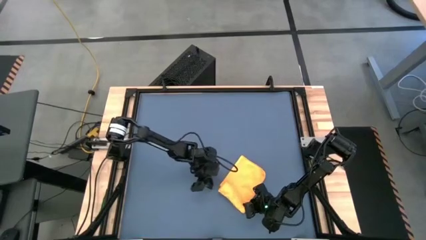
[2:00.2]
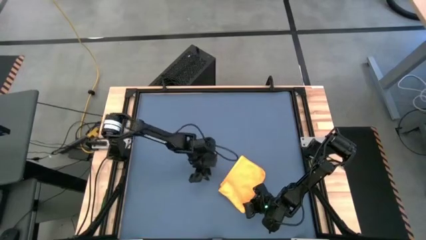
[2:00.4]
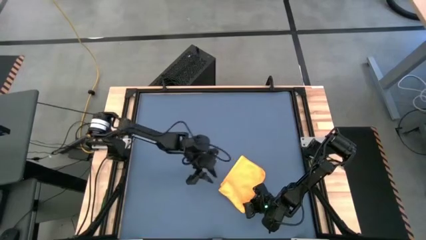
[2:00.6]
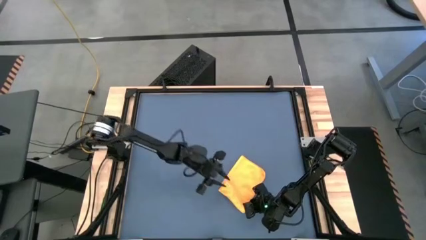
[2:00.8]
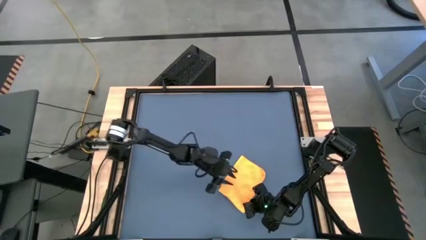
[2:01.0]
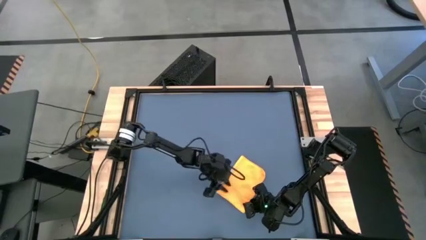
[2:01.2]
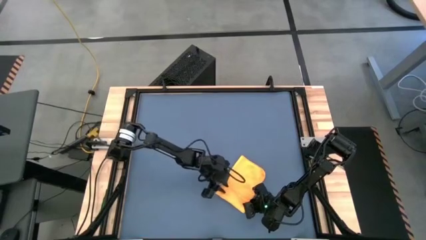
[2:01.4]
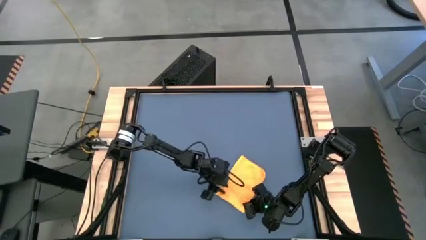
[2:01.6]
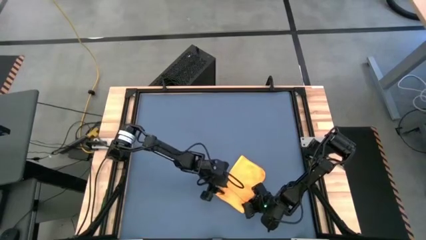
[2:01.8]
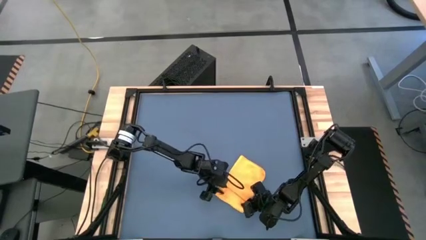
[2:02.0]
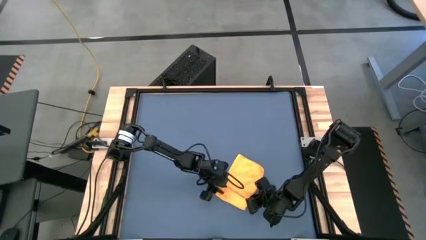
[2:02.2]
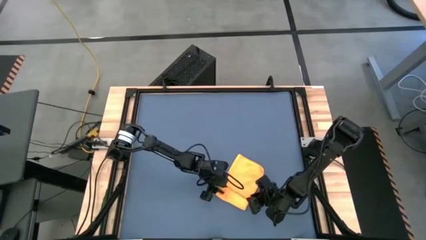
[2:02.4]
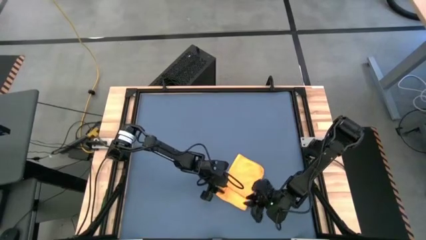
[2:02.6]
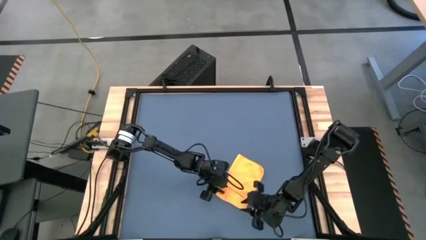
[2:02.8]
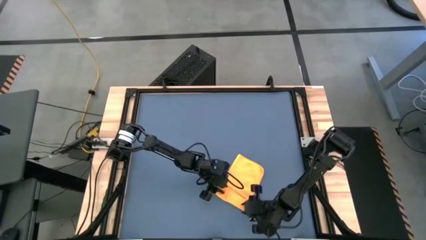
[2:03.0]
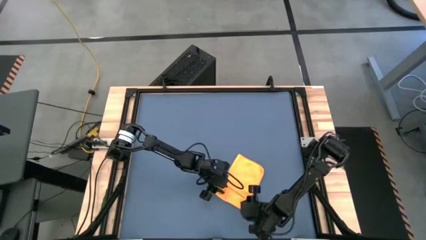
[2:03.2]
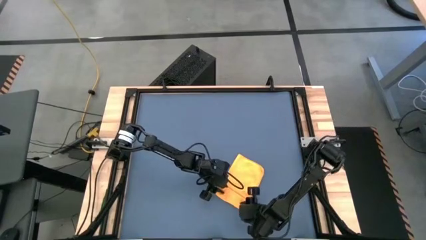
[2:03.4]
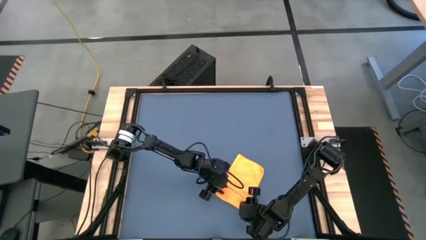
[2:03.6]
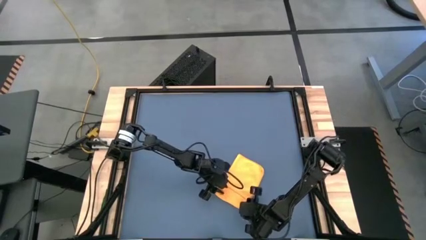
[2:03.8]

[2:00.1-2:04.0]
Task: Roll towel
Roll the orange microfiber towel

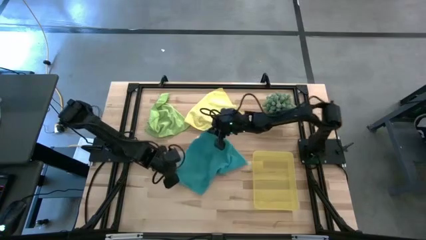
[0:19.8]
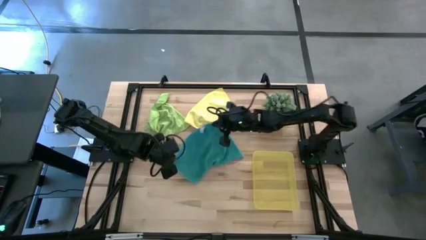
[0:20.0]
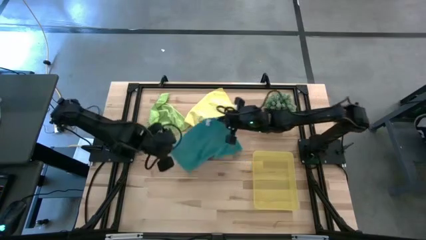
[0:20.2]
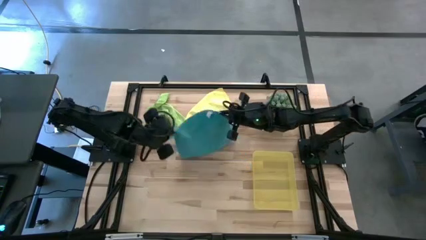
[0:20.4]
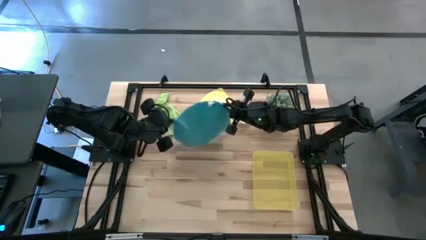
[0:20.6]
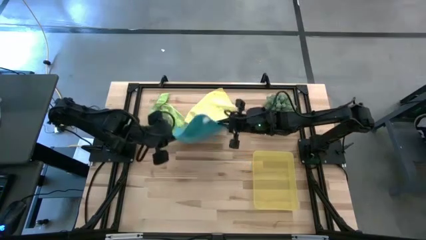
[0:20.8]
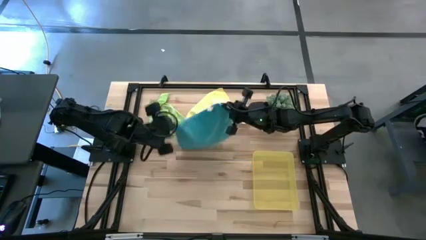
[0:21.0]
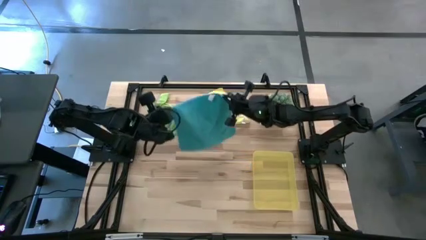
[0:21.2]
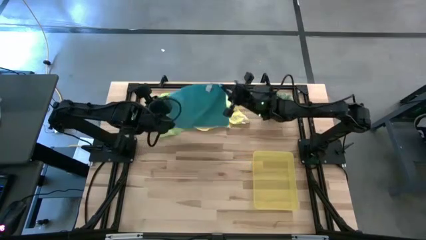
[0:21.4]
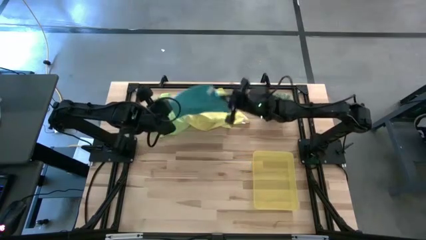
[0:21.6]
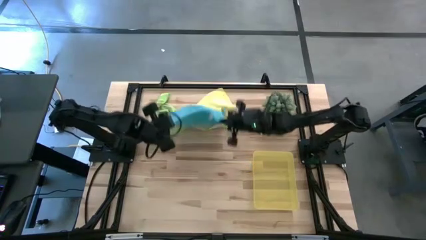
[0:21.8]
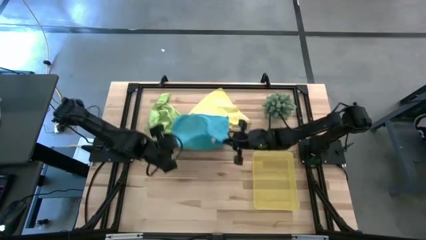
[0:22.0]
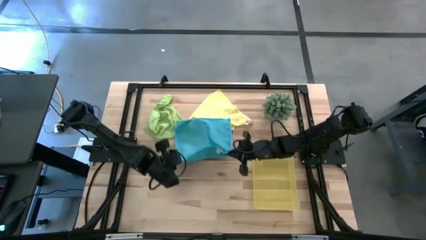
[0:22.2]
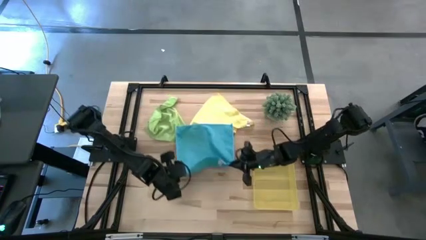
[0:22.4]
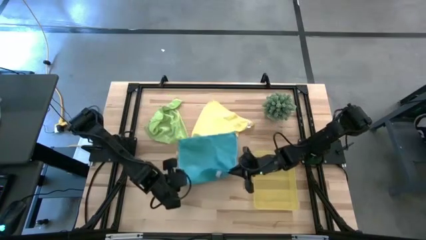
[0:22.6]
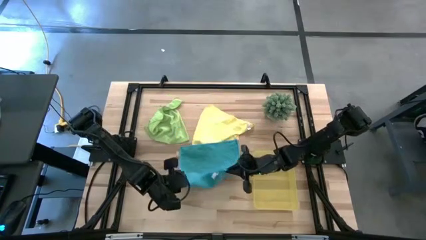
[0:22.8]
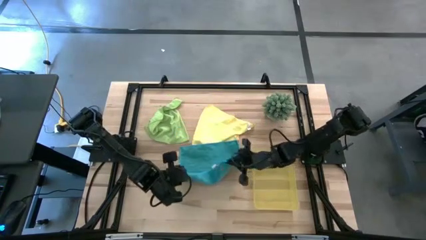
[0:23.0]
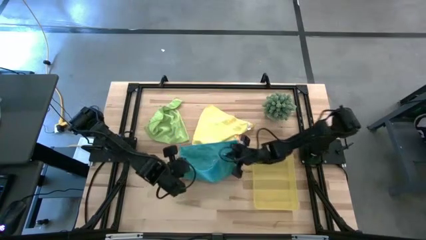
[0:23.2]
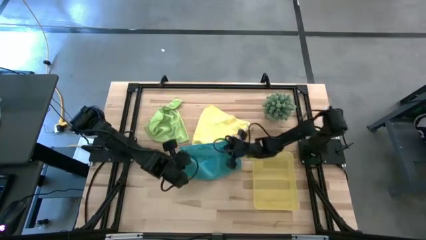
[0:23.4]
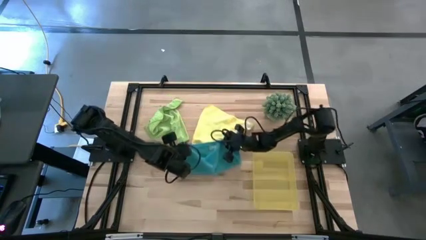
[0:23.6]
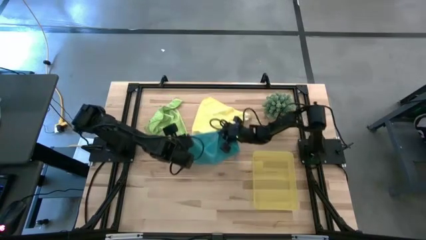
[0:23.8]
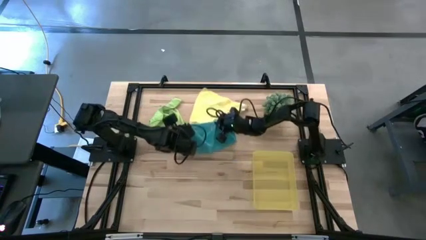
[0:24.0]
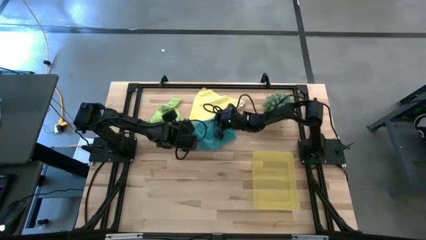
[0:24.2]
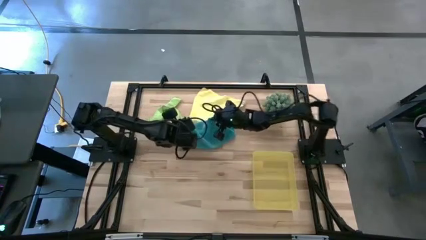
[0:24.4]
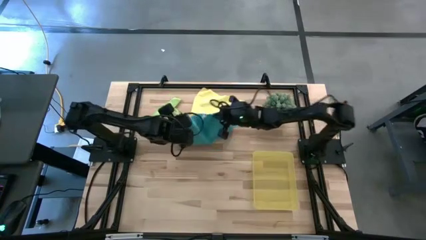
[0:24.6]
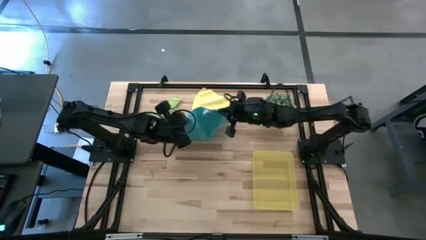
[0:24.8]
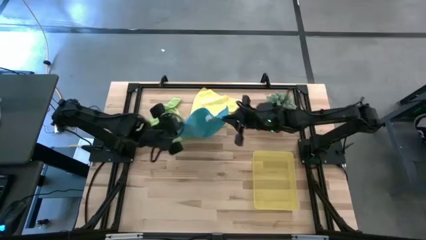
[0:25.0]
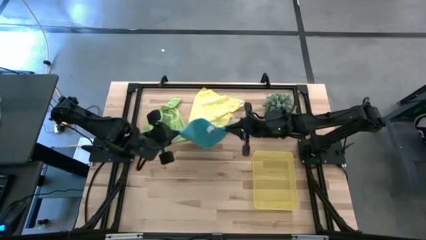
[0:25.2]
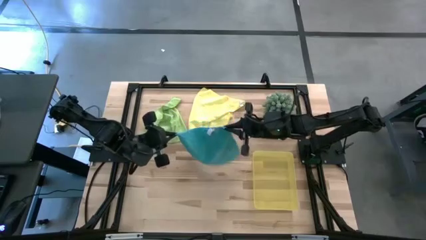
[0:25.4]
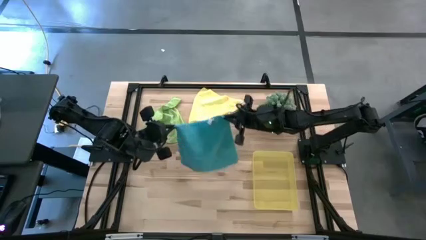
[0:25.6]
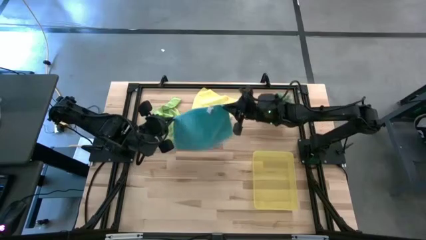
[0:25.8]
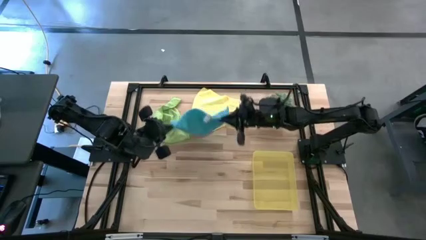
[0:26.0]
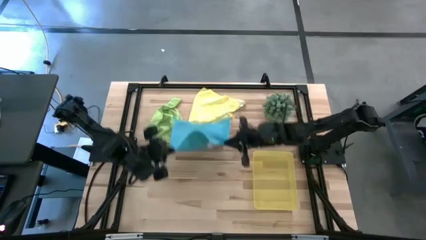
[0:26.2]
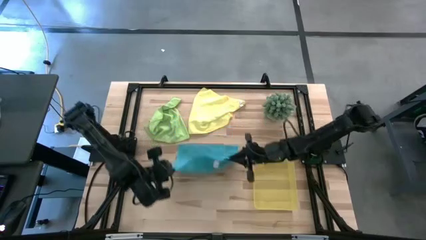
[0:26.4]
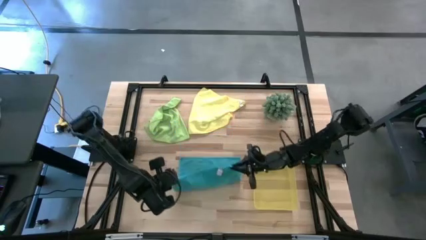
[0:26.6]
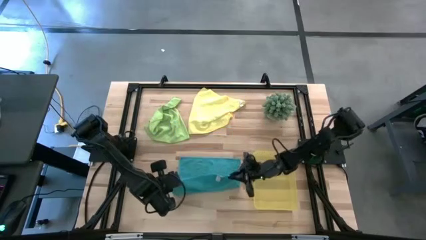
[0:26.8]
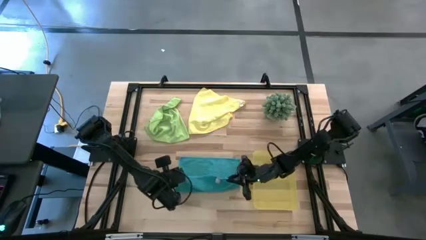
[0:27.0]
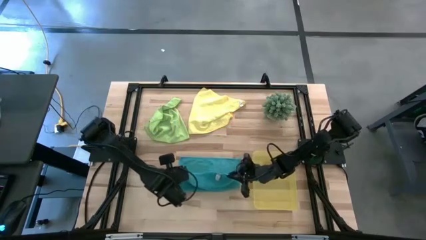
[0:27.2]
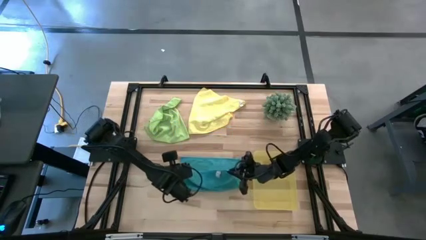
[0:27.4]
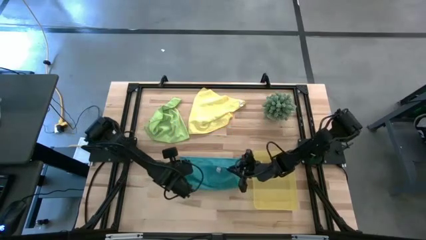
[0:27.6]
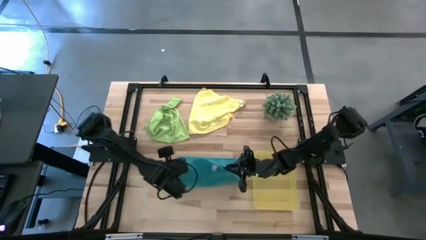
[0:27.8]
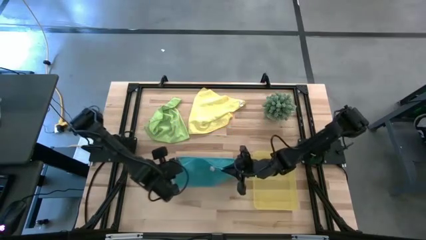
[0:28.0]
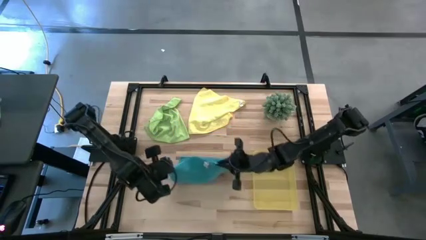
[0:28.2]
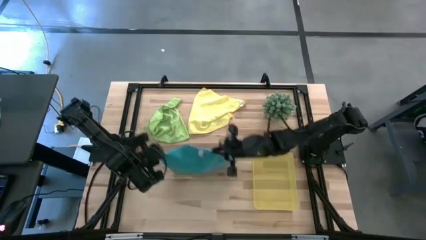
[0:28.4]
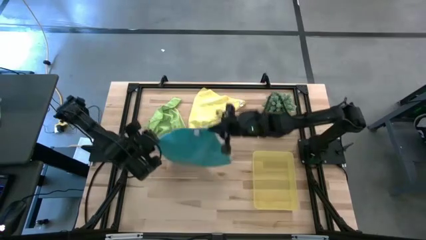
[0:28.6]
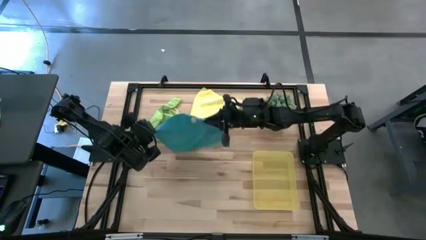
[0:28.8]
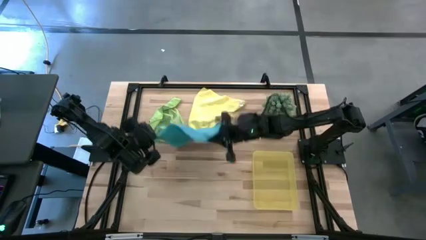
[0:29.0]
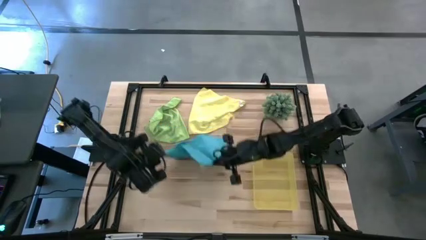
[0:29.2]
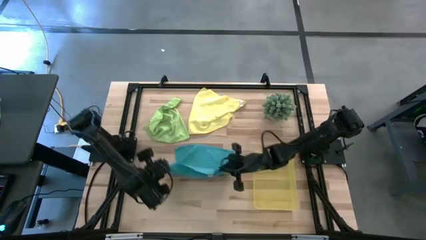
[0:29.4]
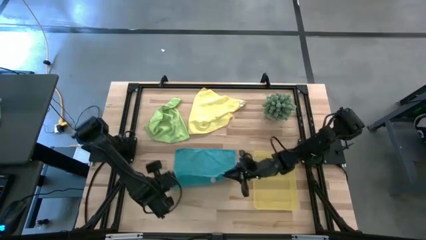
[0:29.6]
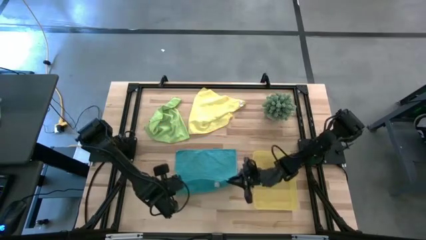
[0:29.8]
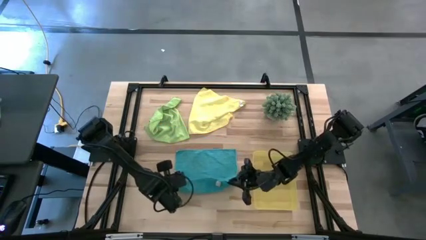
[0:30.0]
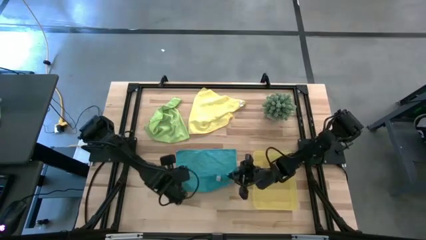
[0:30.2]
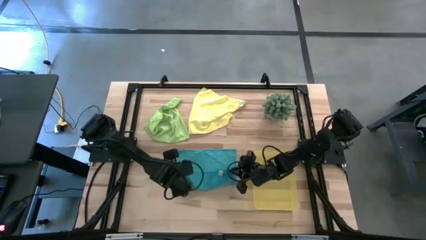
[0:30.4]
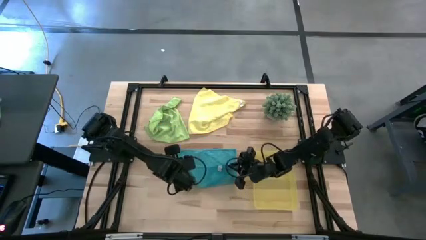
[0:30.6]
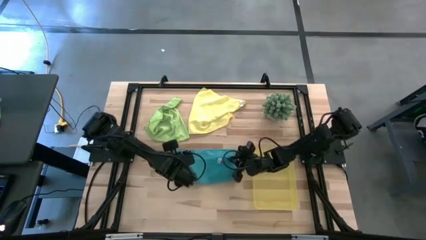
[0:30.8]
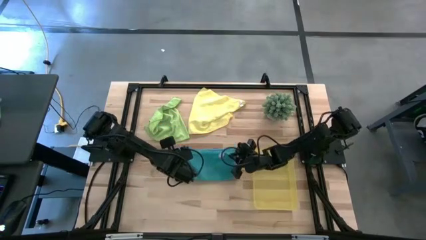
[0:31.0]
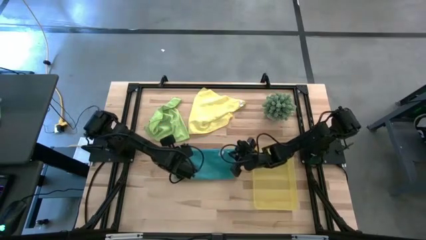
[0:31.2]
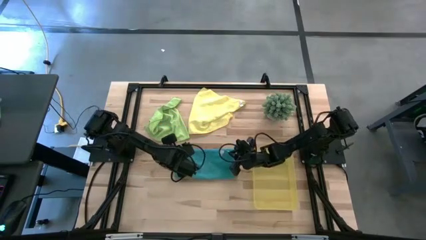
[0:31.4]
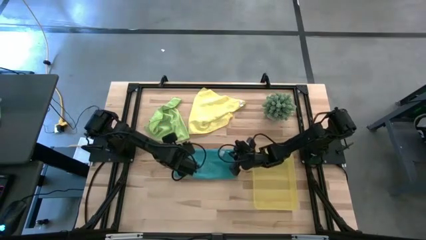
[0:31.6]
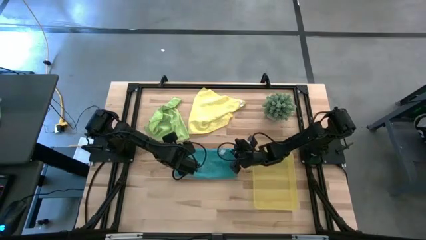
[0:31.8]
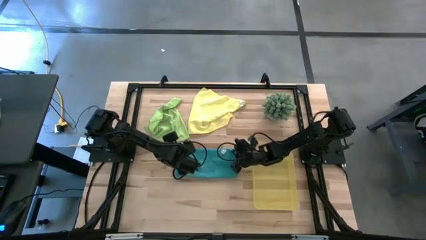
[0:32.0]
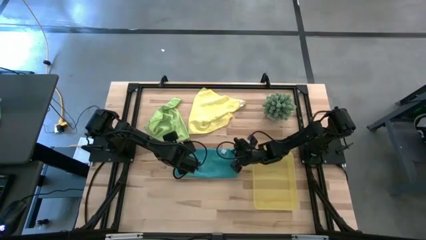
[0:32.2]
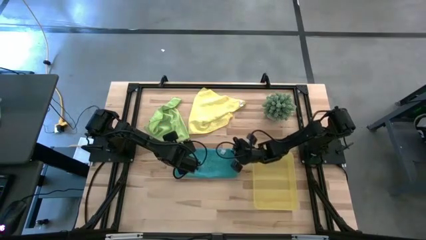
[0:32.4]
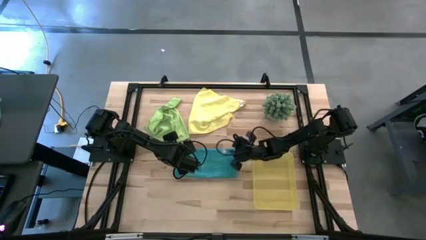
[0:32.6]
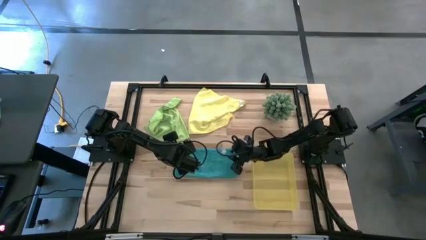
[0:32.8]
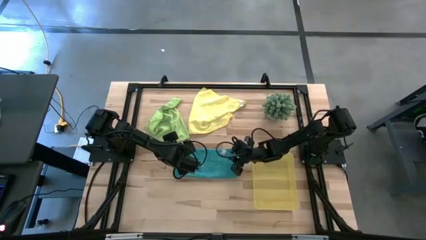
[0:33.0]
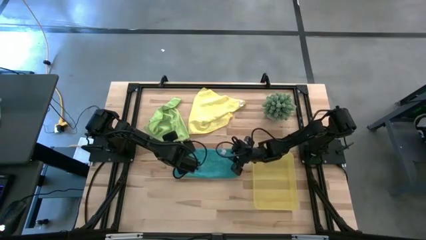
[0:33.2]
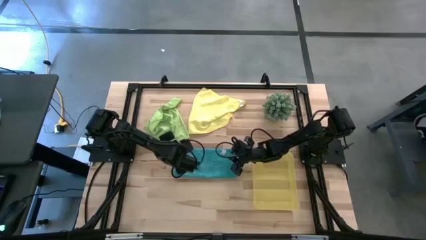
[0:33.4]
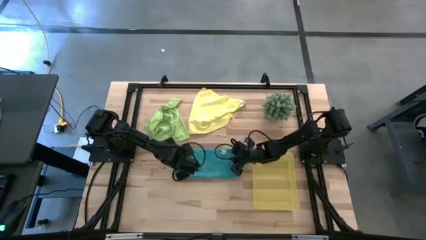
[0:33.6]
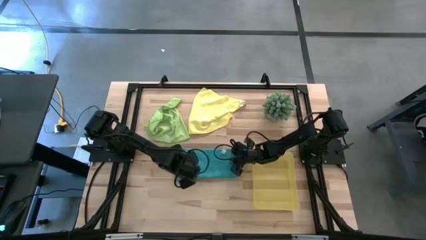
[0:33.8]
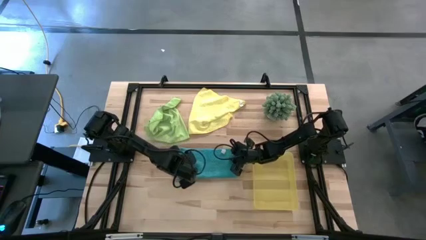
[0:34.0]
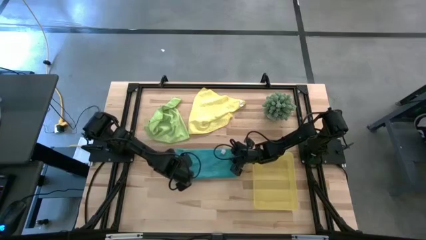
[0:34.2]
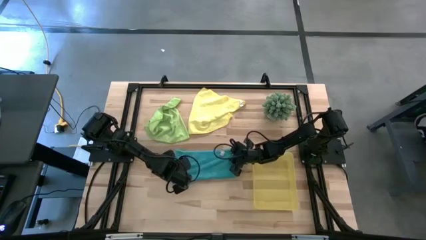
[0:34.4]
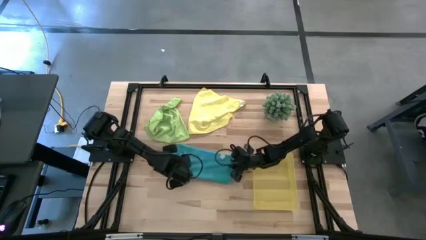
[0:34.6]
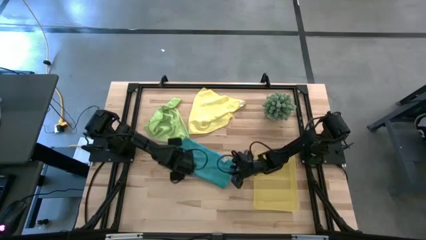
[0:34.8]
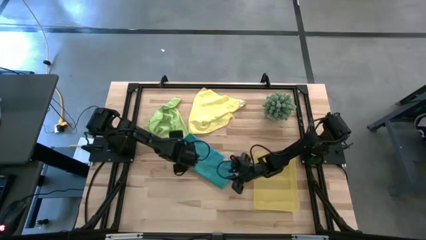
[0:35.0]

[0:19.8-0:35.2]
Task: Roll microfiber towels into tight, uniform cylinder then place into a basket
Fold the blue microfiber cloth
